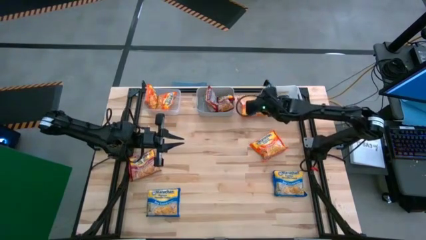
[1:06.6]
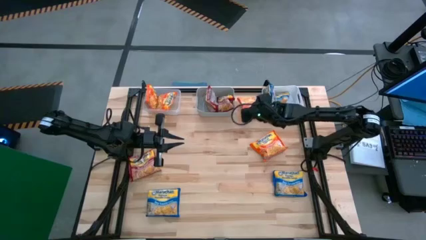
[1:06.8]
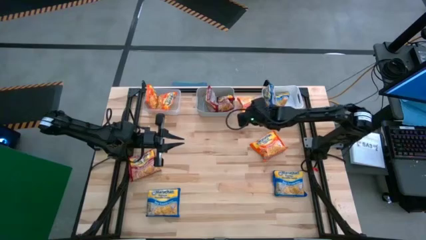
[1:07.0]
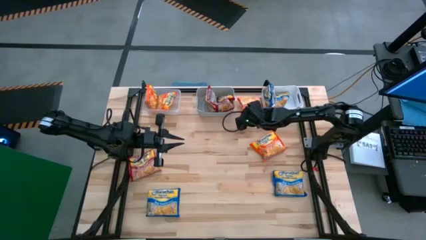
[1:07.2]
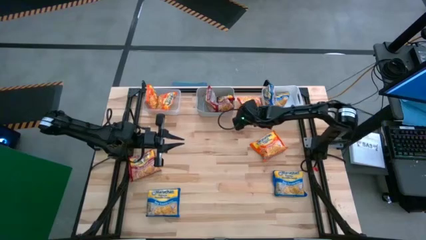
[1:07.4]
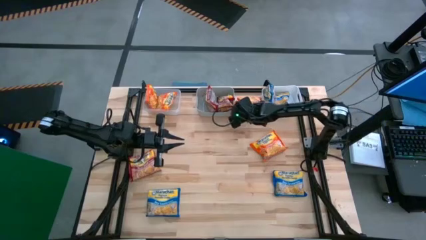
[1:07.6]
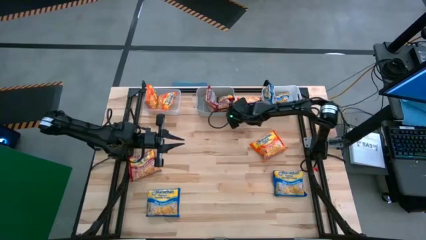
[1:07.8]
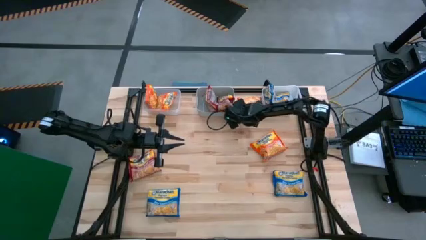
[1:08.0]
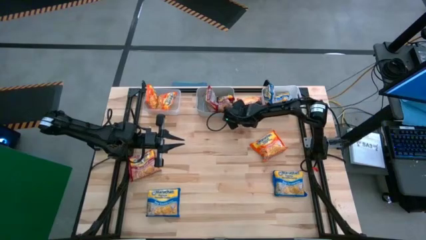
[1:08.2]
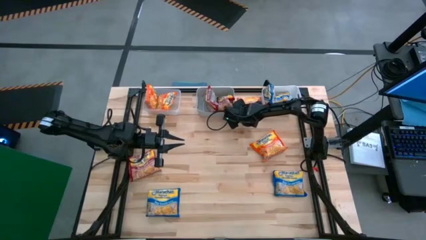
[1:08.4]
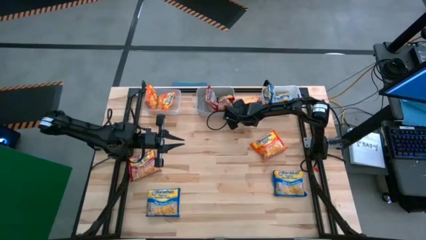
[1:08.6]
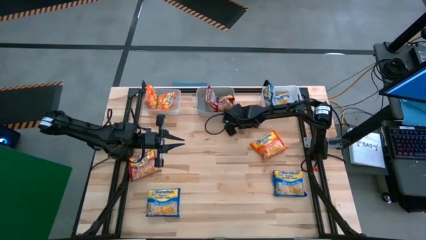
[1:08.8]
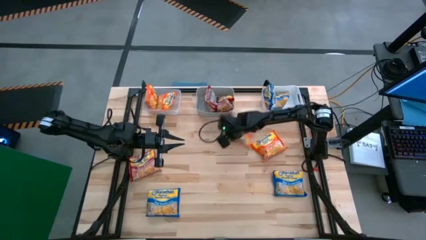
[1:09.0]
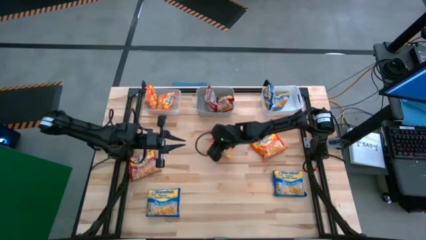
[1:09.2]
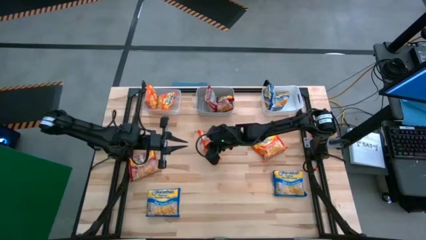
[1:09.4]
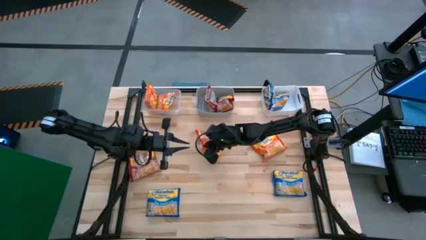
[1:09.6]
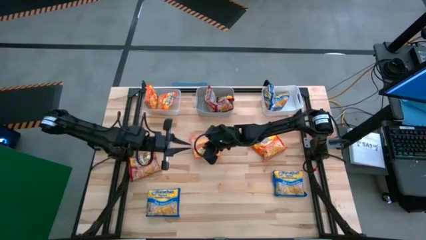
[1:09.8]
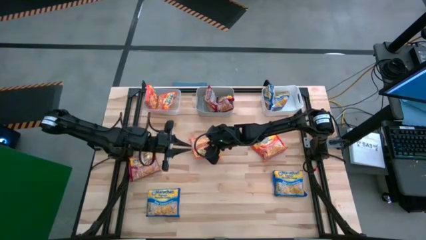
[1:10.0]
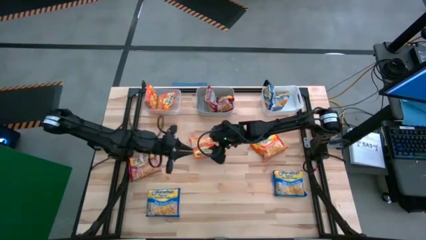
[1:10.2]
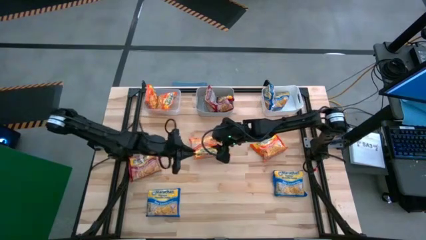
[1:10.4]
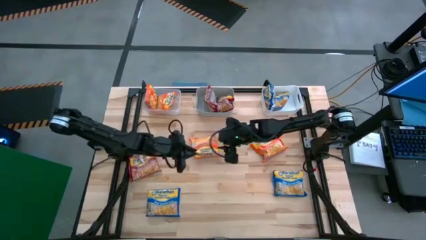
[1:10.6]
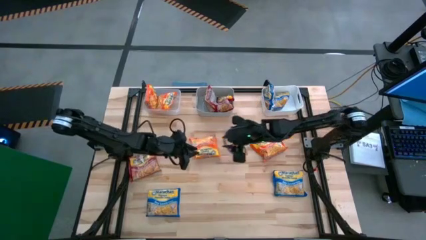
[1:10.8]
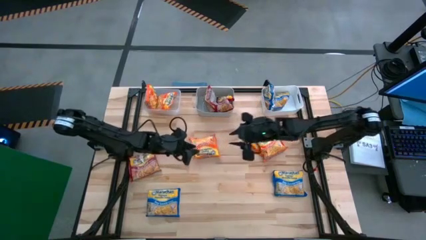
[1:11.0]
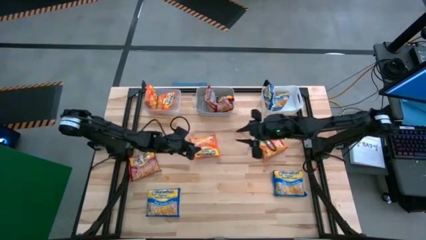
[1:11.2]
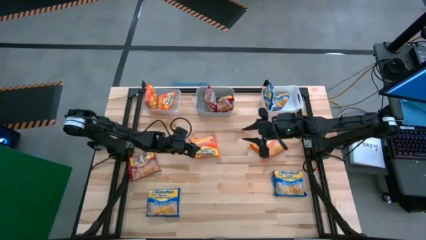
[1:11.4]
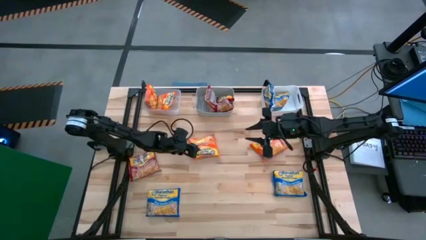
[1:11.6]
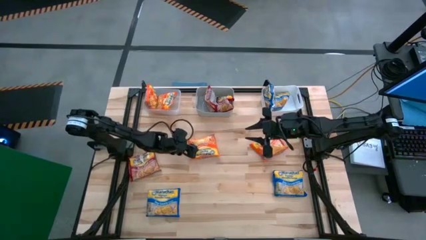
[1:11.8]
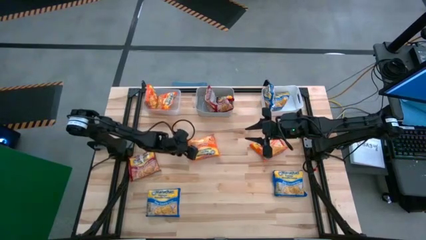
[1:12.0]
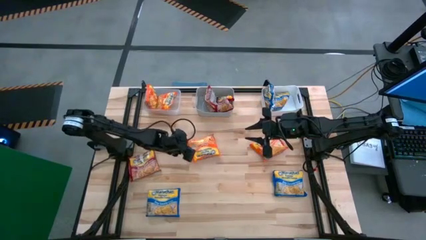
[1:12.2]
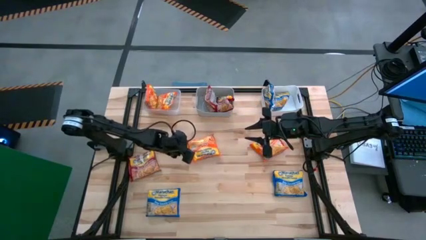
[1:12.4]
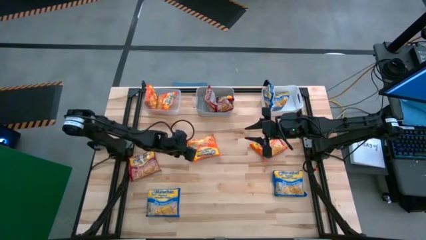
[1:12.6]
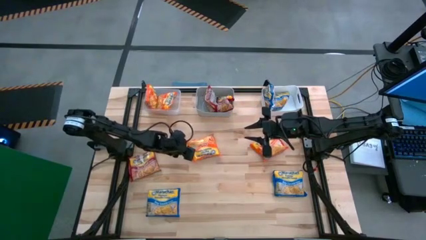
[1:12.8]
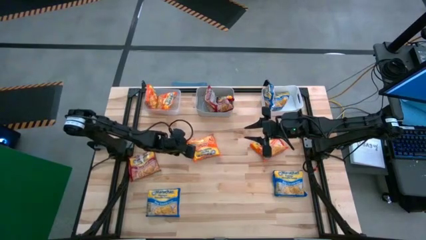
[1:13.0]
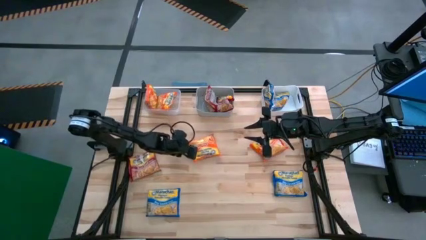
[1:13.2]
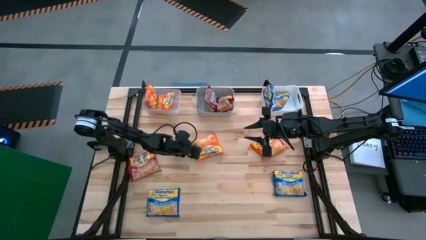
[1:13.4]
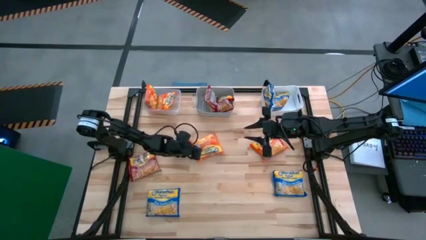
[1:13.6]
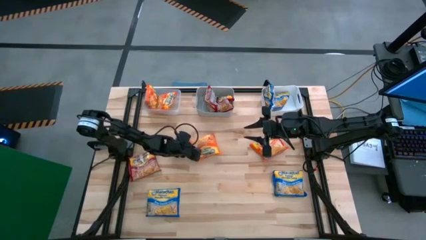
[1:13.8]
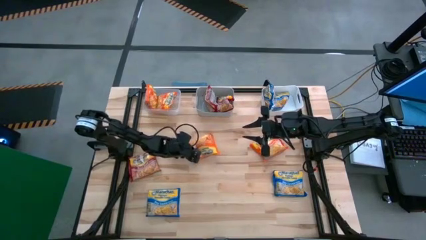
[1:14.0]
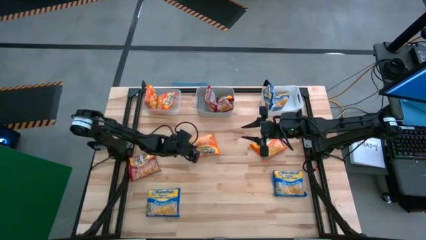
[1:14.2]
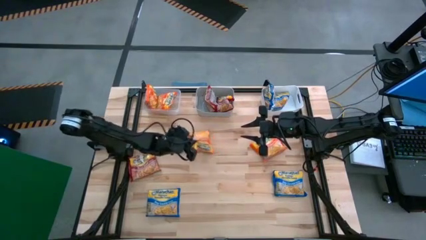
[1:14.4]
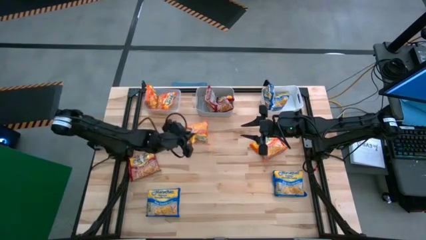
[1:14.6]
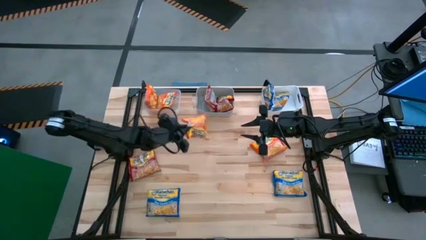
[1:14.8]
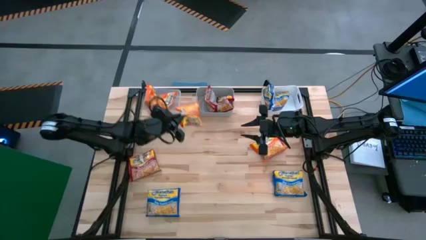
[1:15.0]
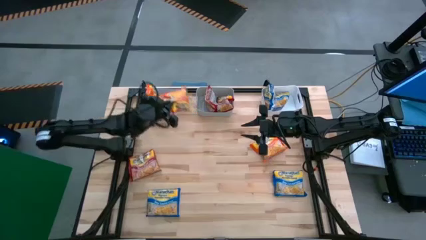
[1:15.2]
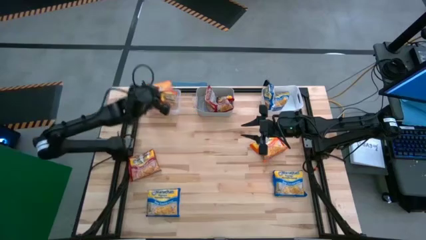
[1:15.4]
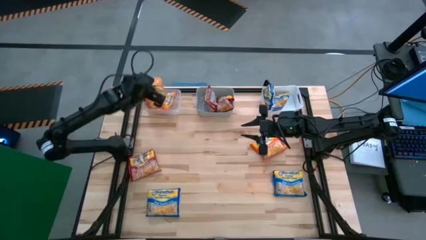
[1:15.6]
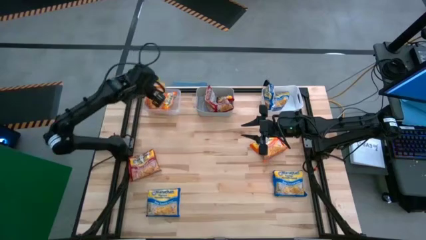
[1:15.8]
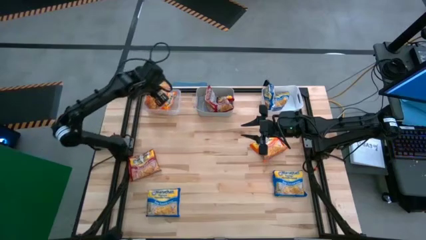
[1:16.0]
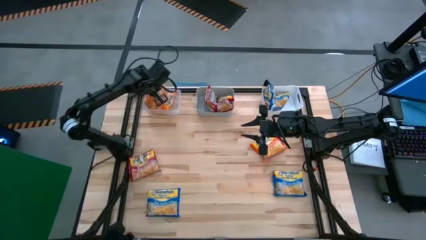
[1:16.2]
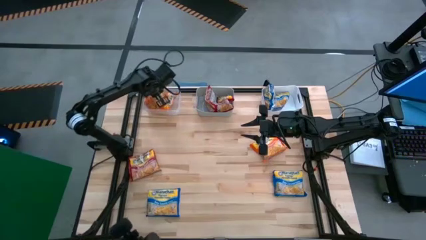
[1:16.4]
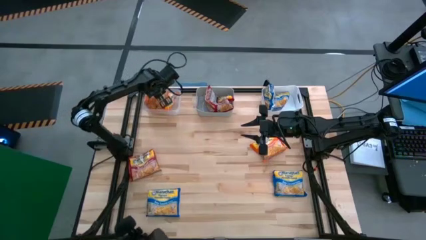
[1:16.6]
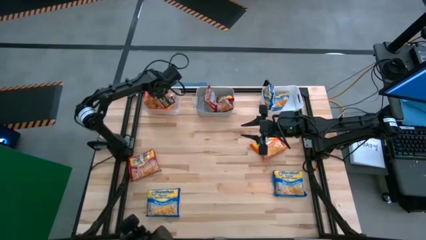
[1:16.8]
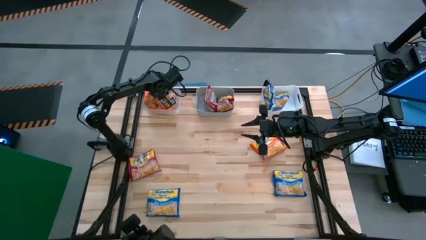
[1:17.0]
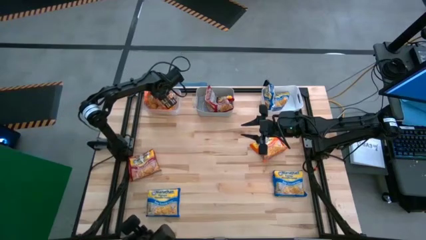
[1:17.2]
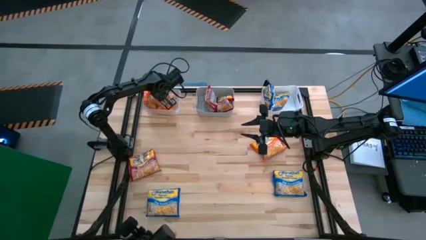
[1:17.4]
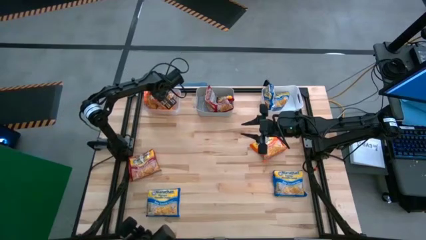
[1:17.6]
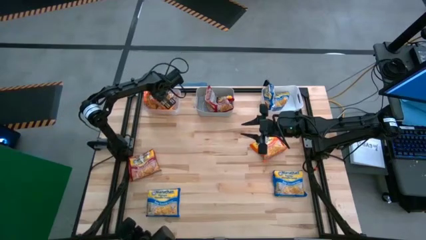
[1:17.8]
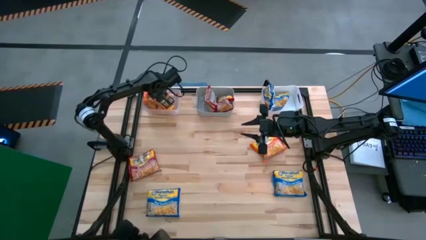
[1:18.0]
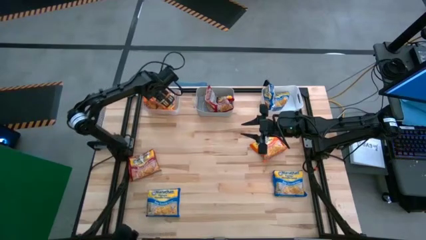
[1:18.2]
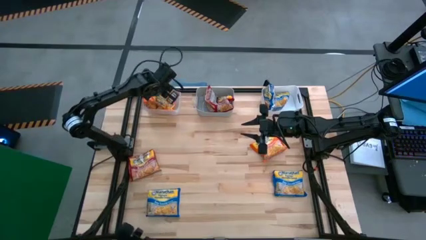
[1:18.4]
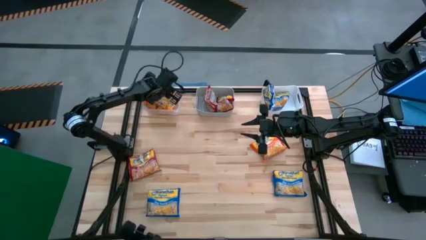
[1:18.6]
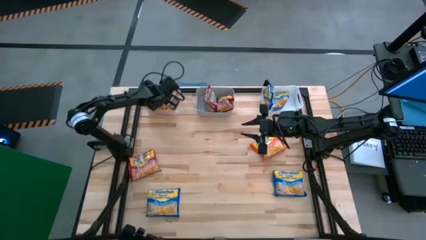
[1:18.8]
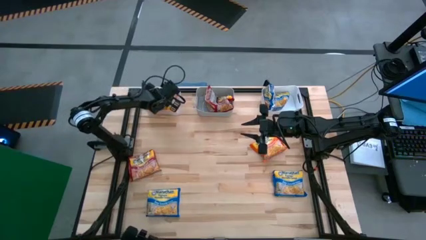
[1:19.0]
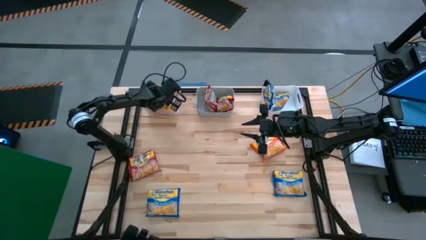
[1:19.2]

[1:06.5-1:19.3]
Task: Sort Maruchan noodles
Put the orange noodle pack into the transparent bin

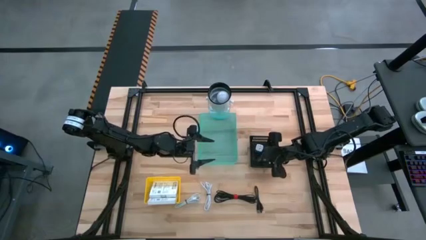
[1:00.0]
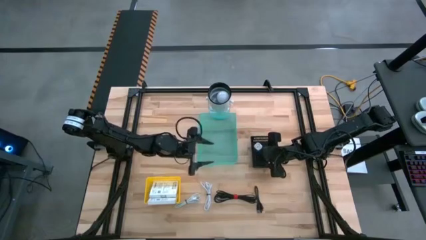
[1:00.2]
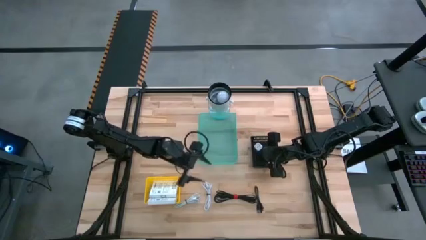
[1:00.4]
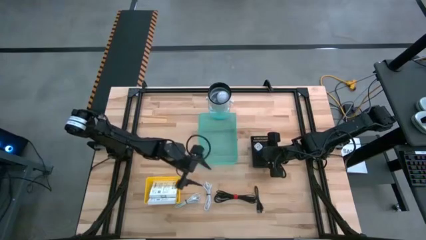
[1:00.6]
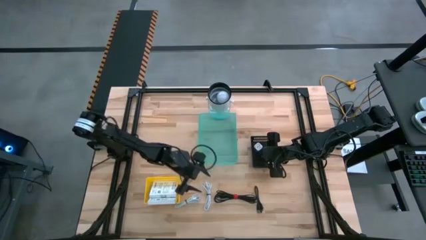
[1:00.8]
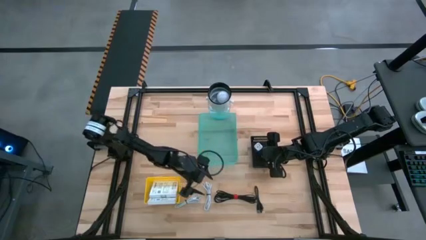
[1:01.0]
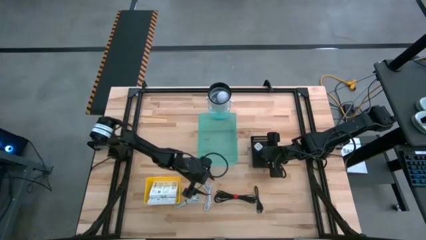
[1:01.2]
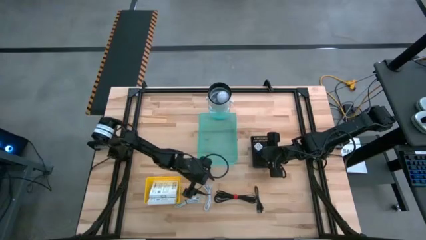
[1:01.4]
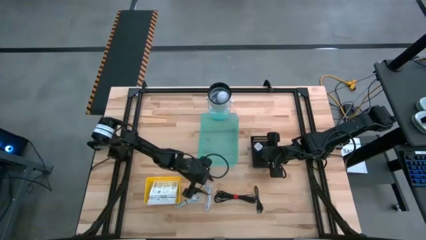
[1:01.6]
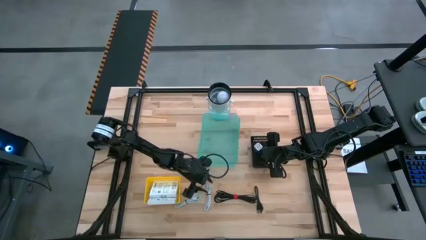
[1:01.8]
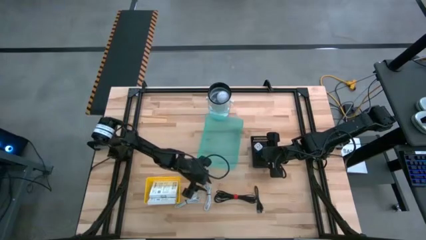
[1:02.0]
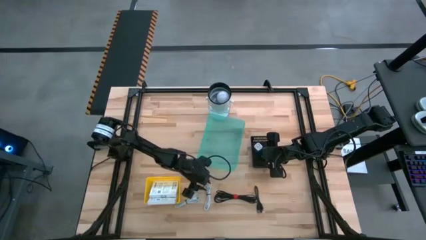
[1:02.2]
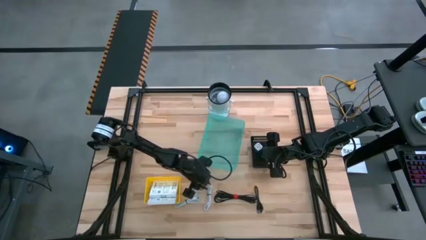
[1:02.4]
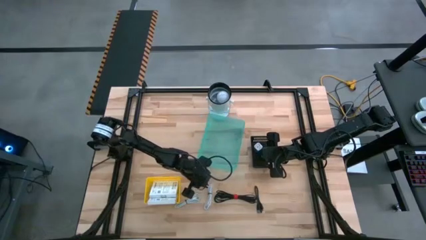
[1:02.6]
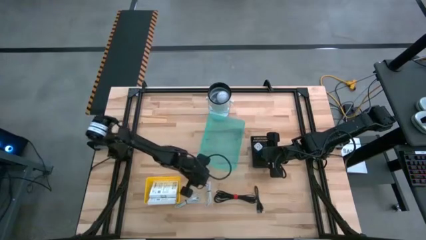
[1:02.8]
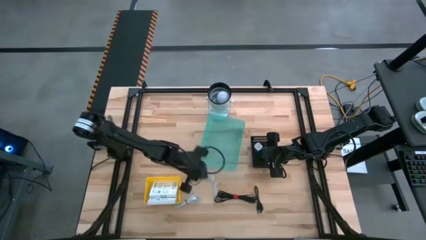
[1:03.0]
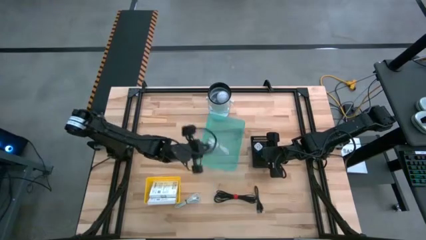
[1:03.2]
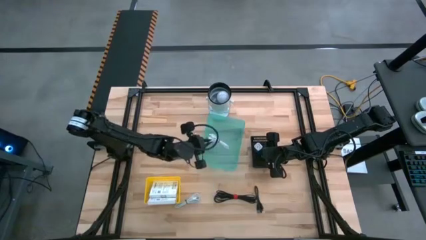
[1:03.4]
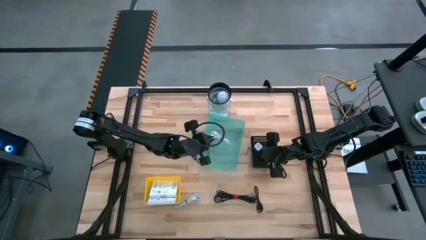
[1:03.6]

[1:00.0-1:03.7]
Task: Pick and place items into bin
Put the right white charger cable into the green bin
